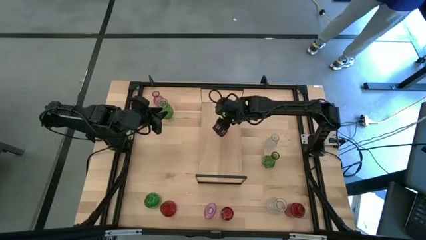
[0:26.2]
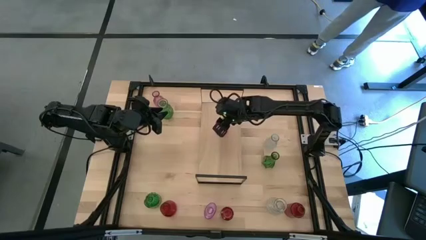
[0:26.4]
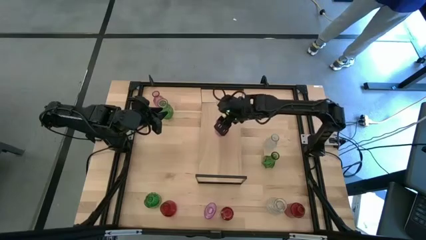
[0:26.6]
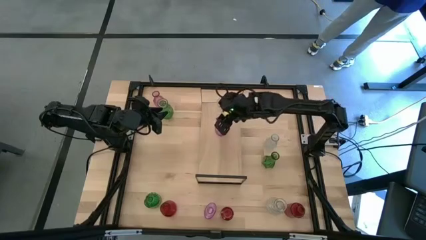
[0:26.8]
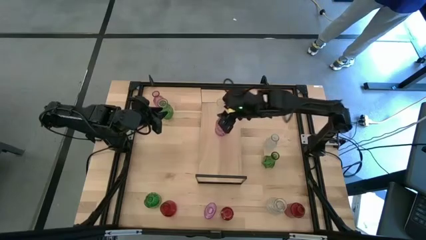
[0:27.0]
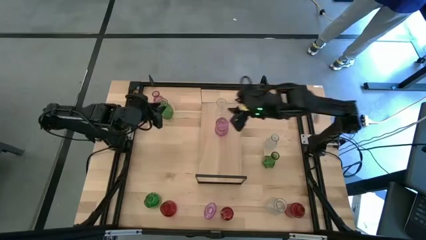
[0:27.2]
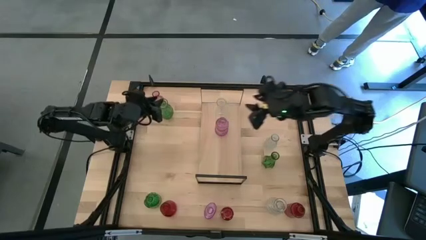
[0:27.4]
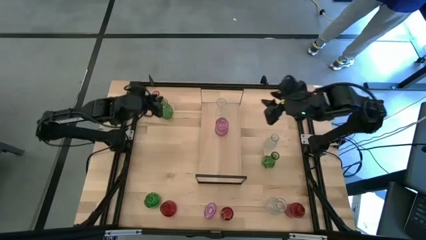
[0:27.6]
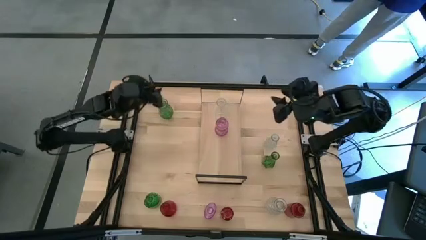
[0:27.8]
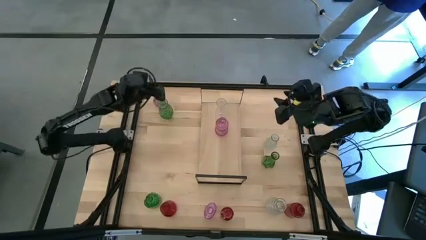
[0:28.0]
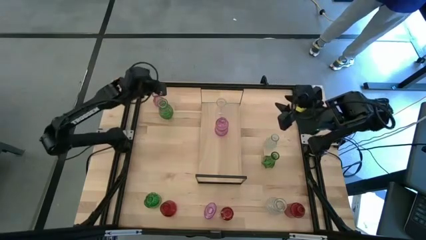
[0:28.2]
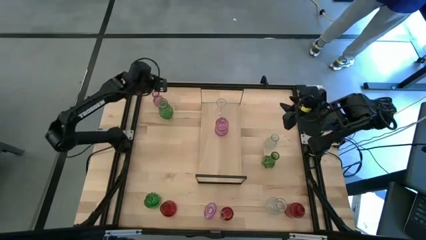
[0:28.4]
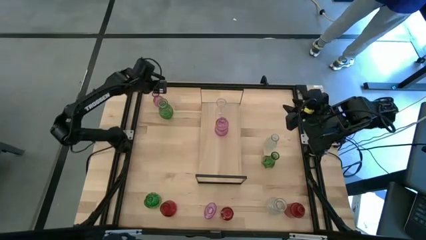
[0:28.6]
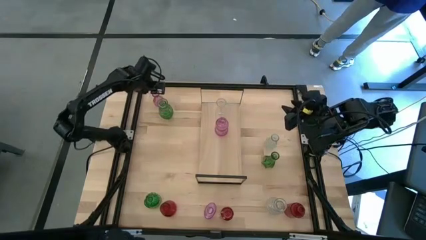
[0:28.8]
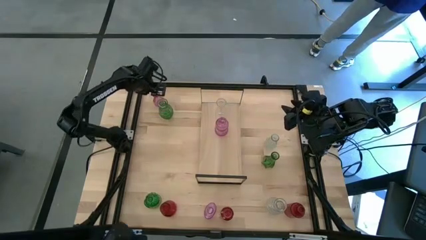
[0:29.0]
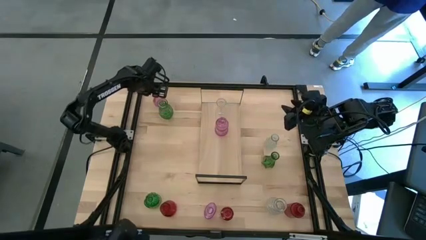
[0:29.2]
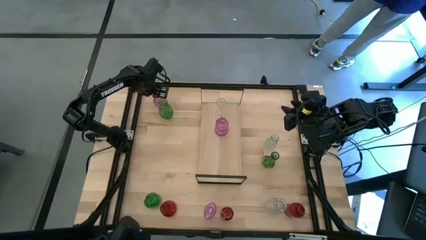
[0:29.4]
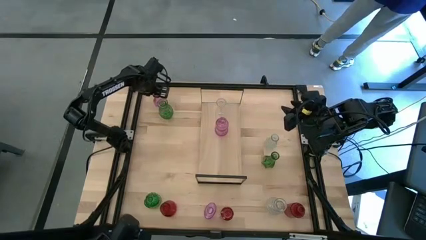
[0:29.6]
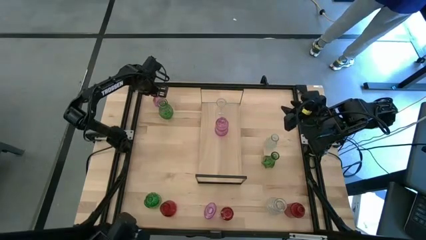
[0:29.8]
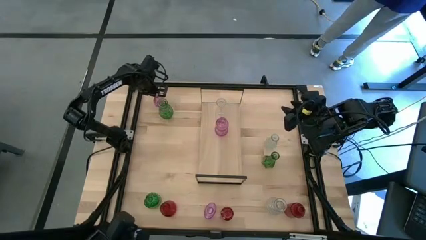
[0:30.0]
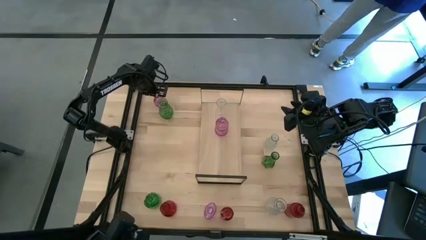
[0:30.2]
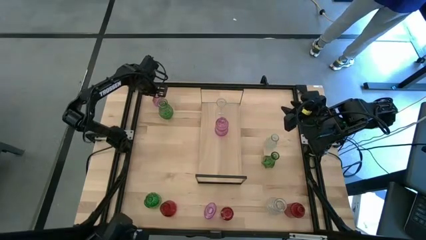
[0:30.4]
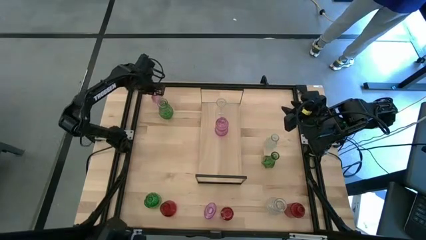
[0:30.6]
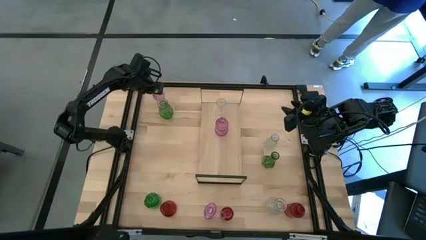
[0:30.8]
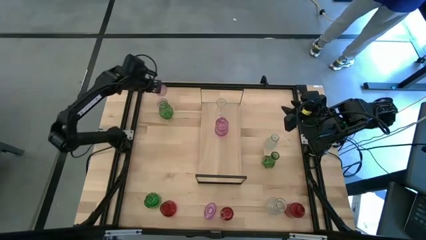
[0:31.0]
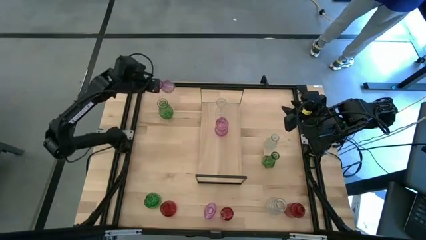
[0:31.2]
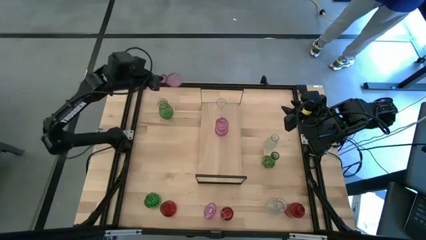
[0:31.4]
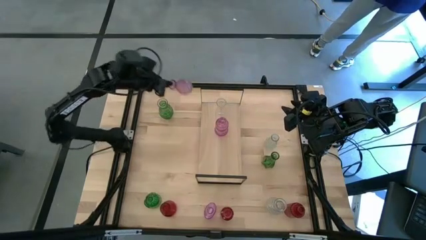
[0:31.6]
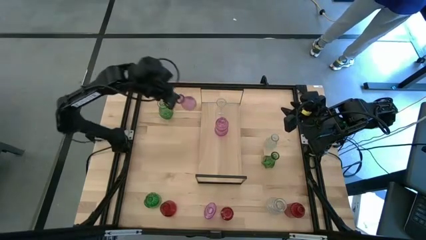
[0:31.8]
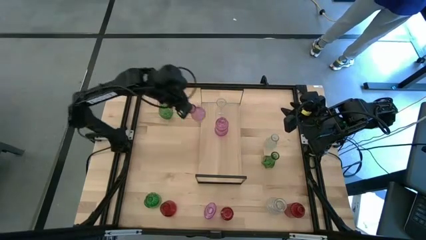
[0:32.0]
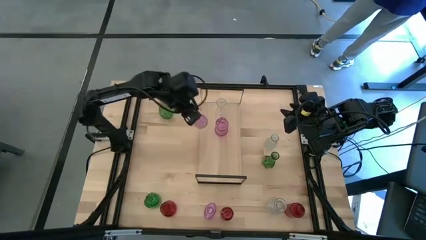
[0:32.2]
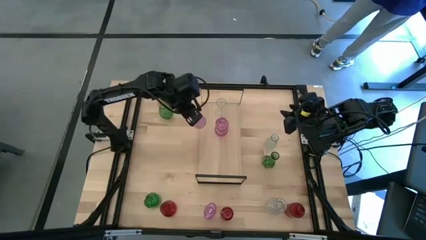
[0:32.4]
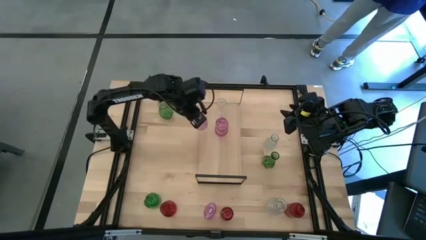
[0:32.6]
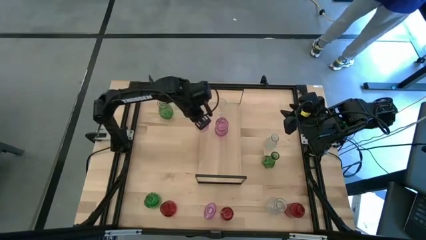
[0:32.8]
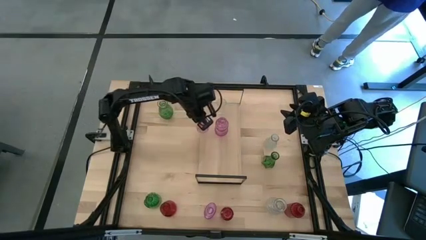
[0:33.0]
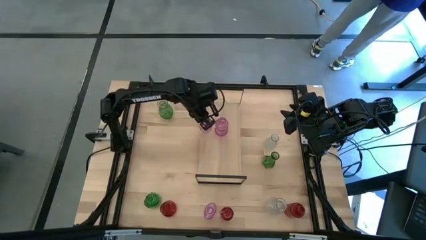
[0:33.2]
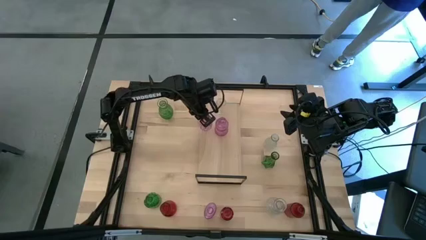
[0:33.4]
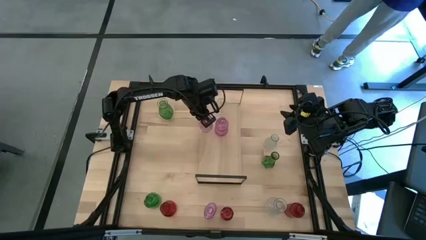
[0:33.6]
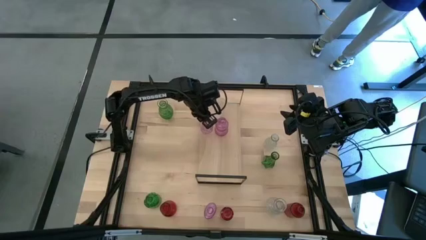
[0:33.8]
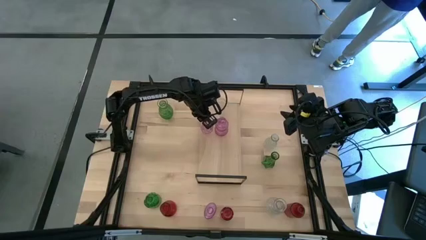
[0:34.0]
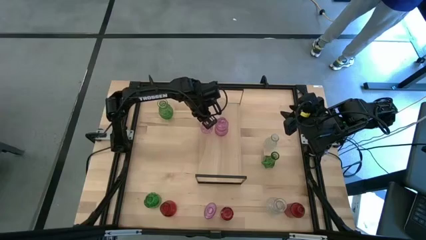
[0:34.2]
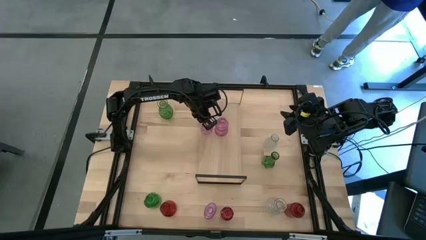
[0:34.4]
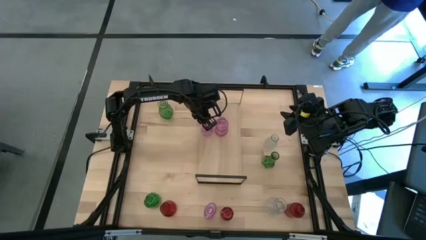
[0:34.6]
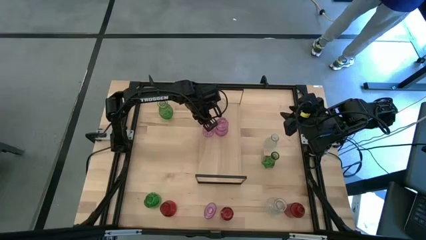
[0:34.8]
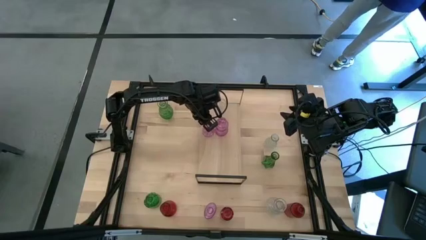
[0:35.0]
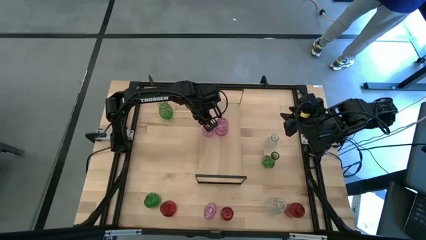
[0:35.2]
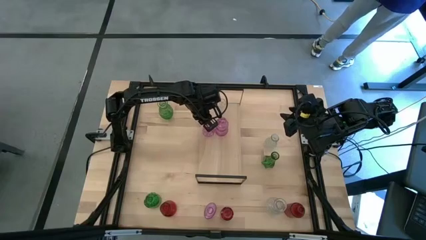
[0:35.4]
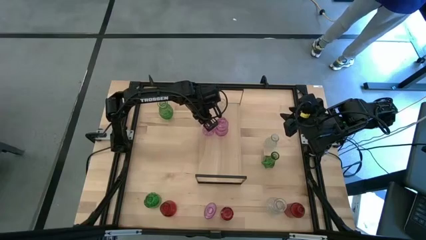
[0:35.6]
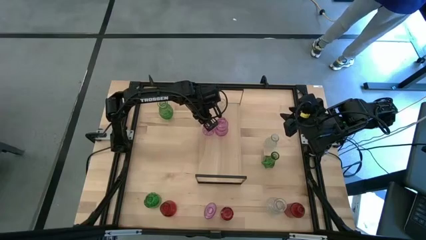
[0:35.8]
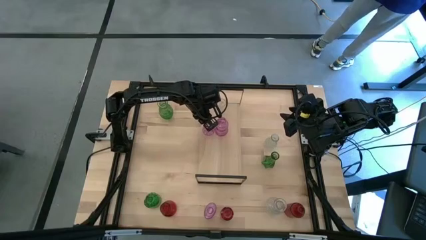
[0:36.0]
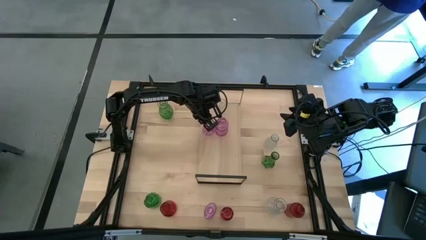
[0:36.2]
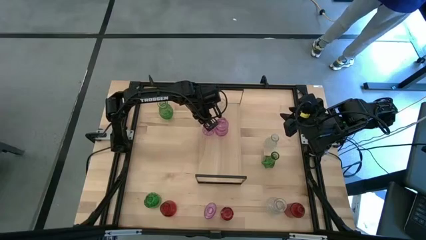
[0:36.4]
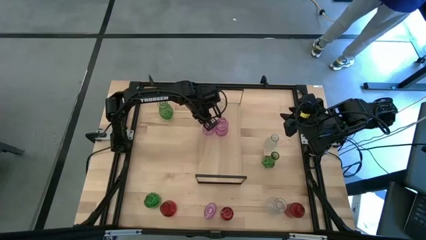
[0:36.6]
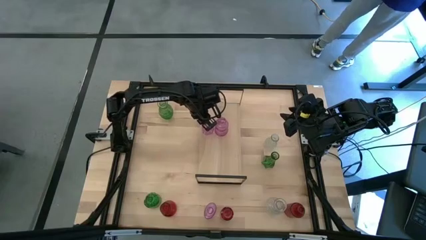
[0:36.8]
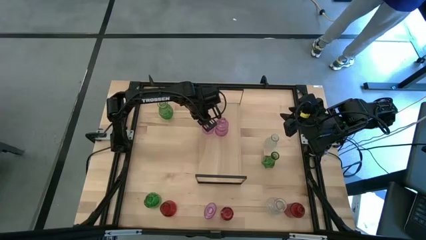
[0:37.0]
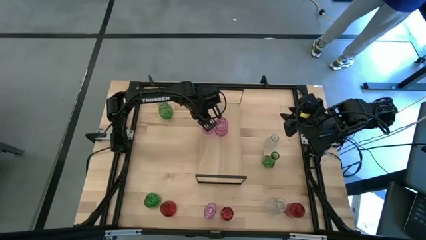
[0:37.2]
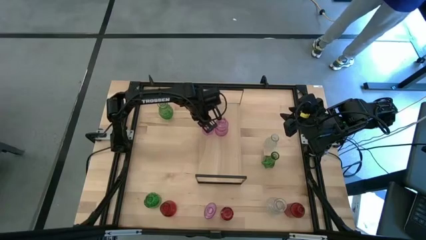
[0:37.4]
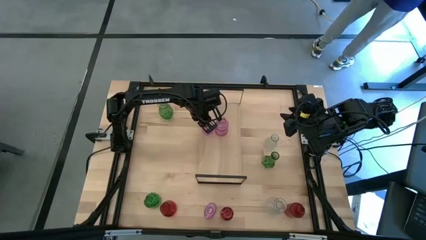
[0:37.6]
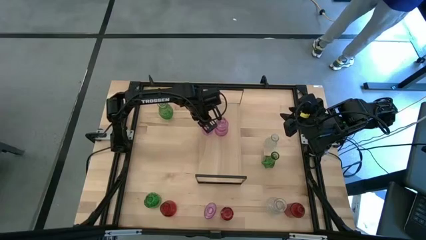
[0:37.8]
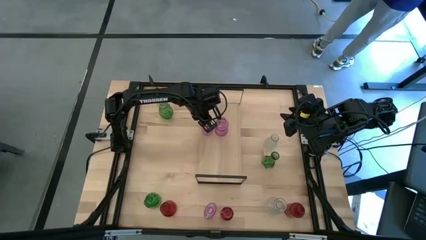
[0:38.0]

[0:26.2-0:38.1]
Task: sort vases onto shelf
Put the top purple vase on the shelf aligned with the other purple vase
